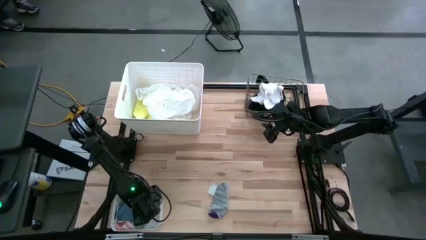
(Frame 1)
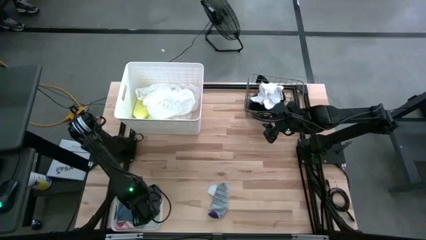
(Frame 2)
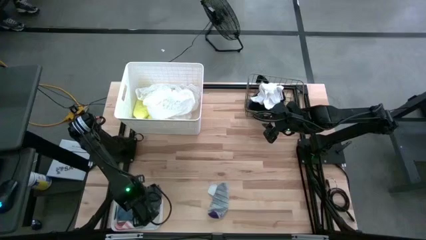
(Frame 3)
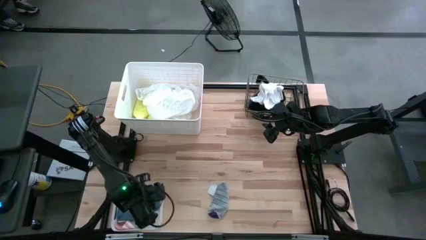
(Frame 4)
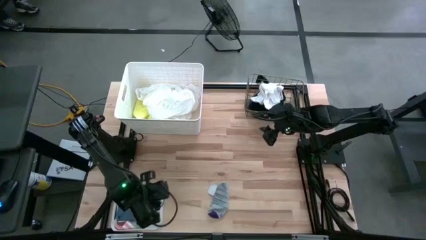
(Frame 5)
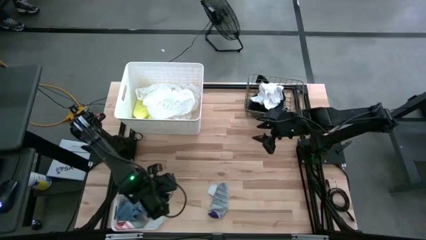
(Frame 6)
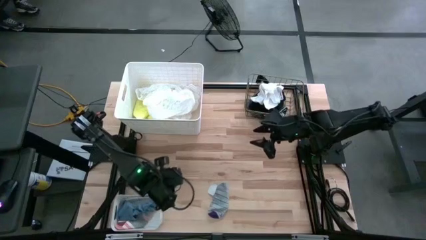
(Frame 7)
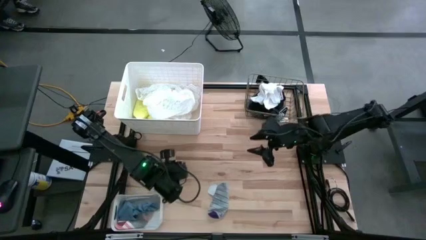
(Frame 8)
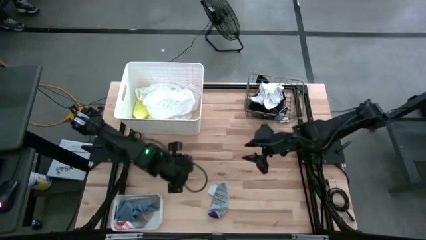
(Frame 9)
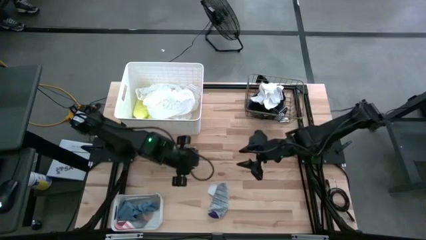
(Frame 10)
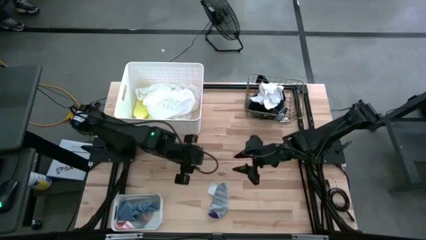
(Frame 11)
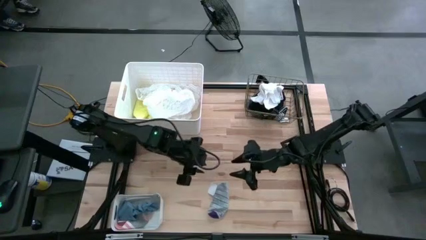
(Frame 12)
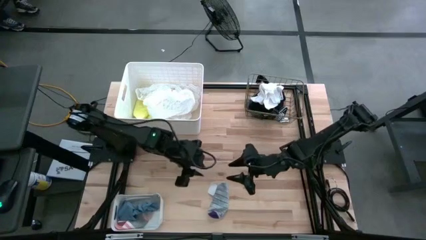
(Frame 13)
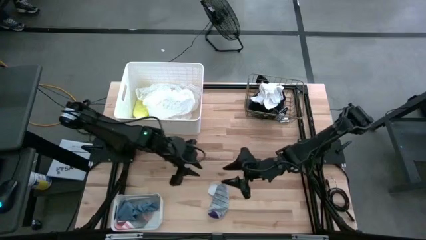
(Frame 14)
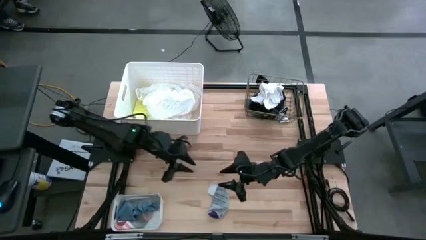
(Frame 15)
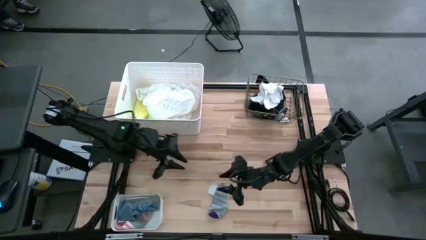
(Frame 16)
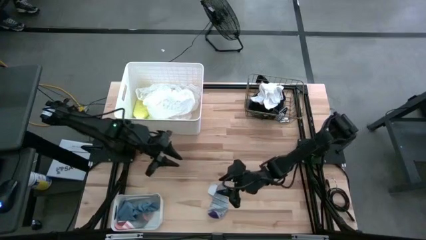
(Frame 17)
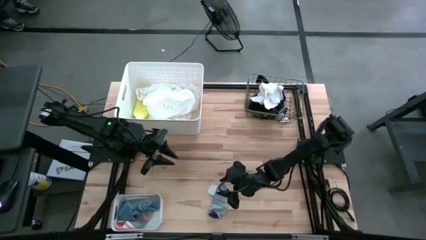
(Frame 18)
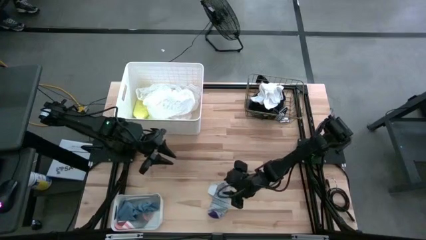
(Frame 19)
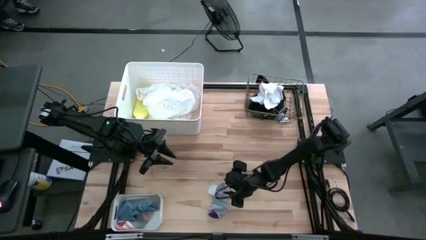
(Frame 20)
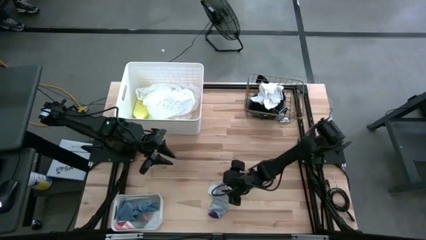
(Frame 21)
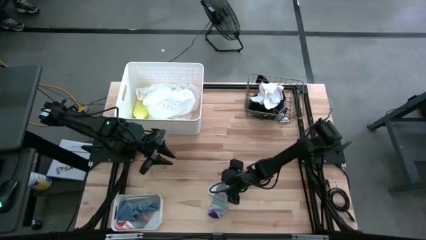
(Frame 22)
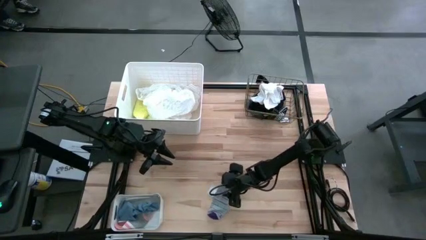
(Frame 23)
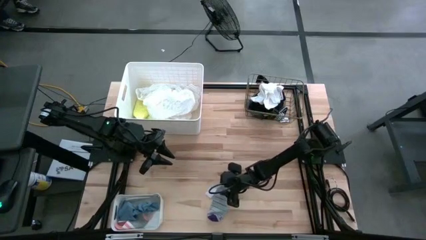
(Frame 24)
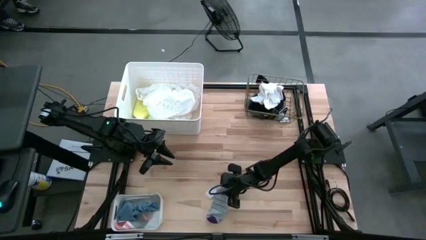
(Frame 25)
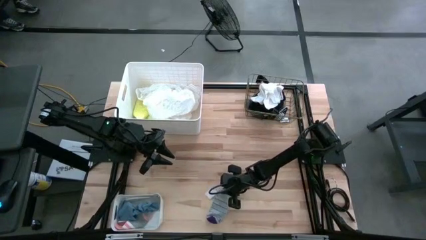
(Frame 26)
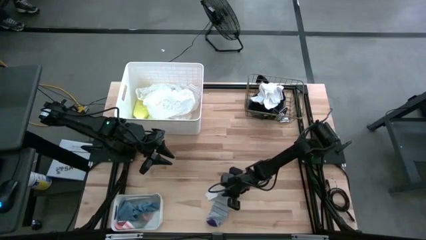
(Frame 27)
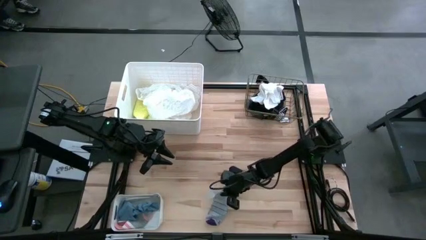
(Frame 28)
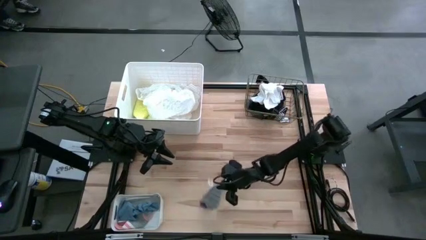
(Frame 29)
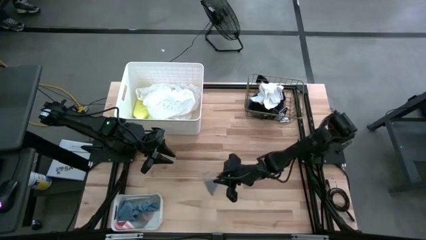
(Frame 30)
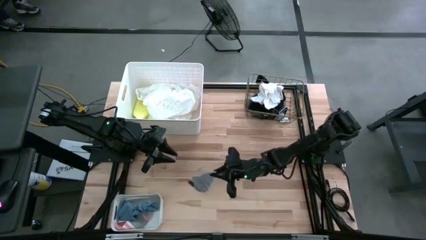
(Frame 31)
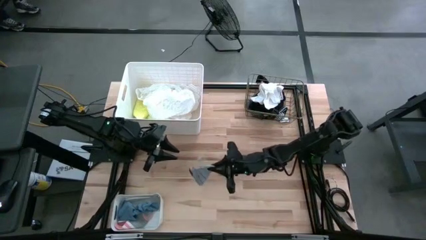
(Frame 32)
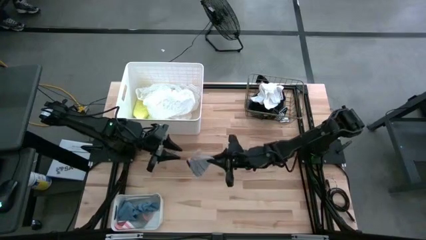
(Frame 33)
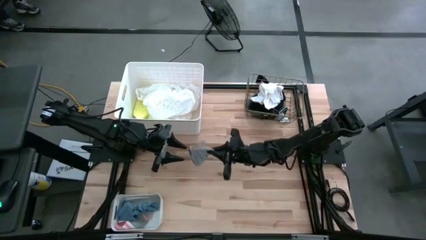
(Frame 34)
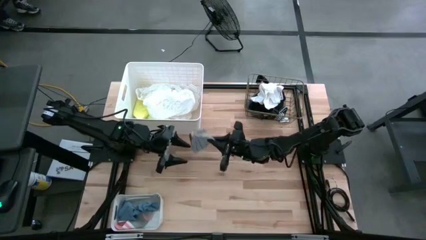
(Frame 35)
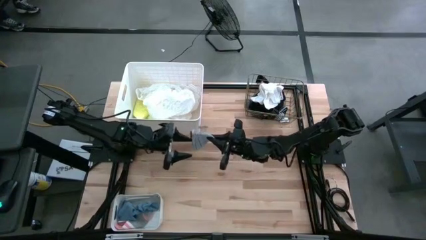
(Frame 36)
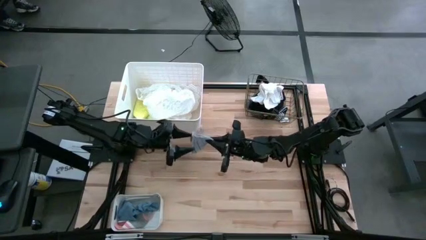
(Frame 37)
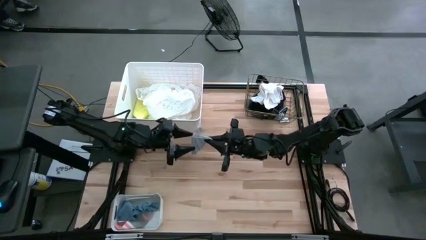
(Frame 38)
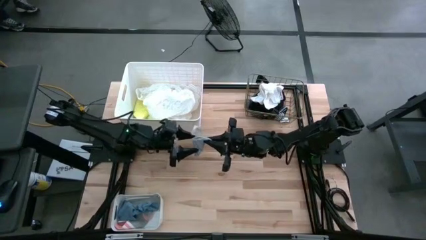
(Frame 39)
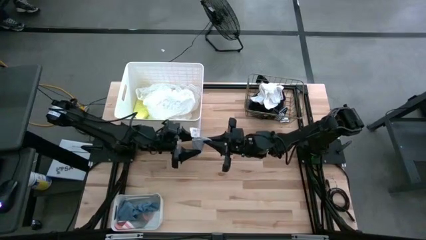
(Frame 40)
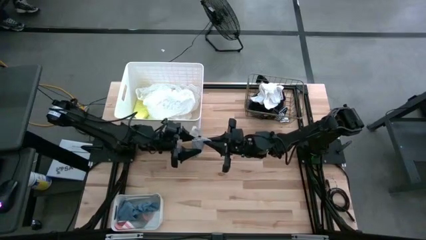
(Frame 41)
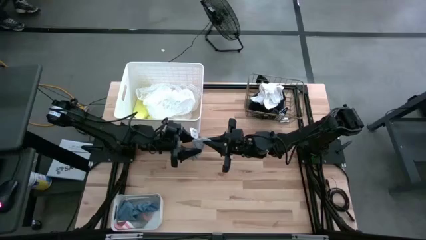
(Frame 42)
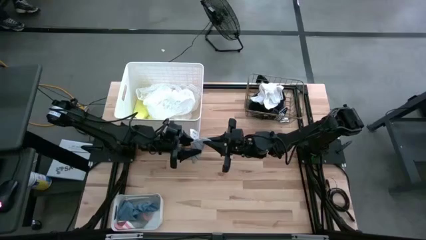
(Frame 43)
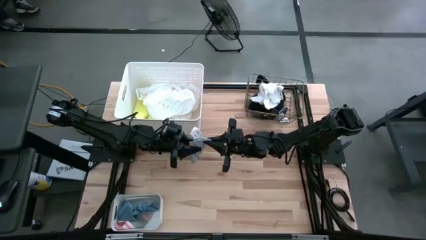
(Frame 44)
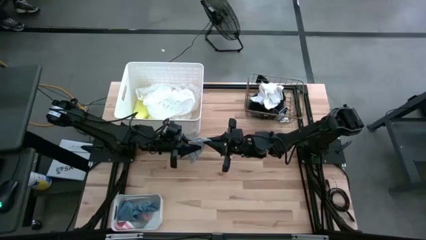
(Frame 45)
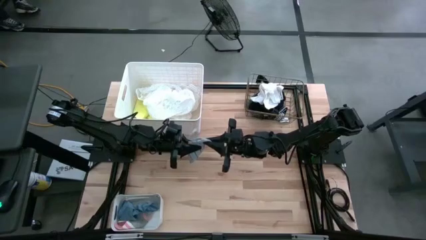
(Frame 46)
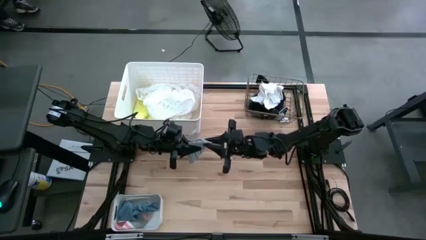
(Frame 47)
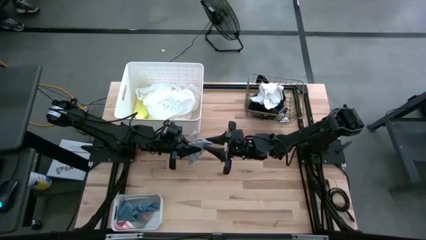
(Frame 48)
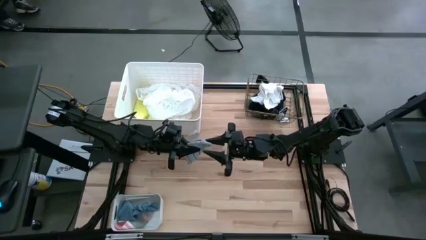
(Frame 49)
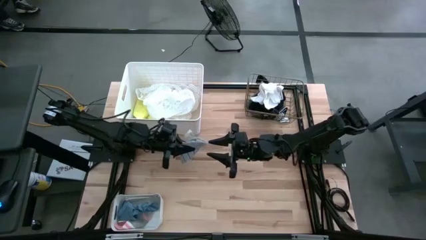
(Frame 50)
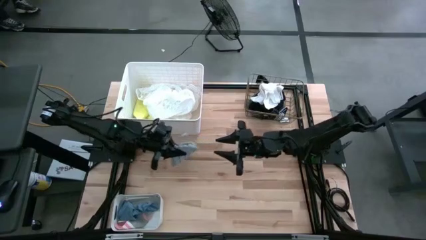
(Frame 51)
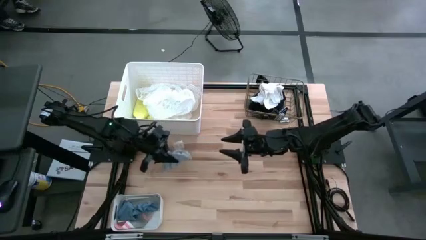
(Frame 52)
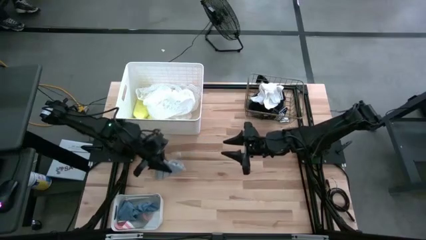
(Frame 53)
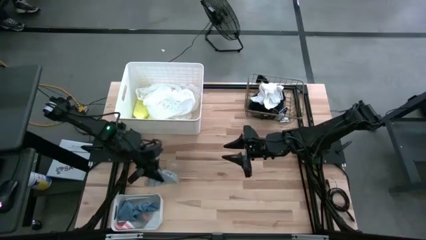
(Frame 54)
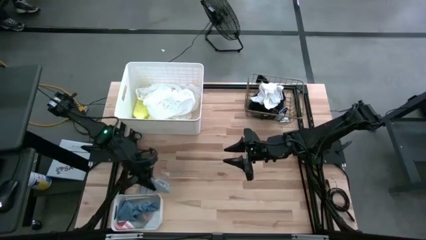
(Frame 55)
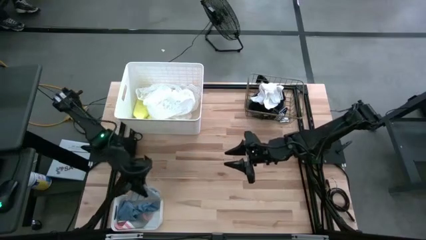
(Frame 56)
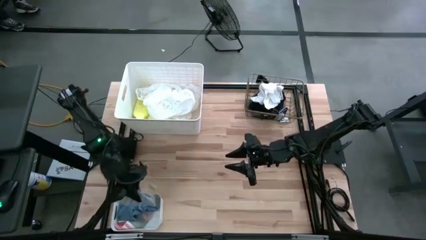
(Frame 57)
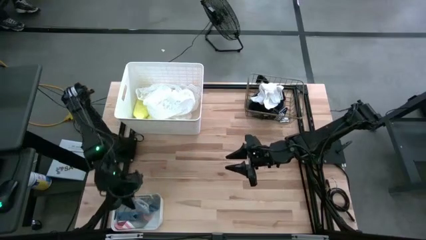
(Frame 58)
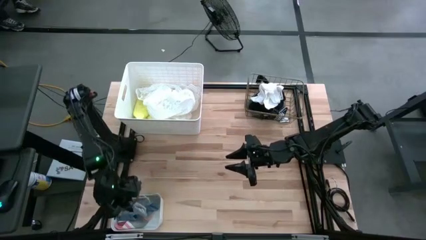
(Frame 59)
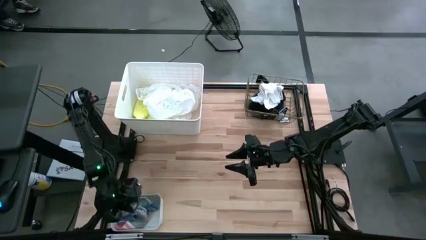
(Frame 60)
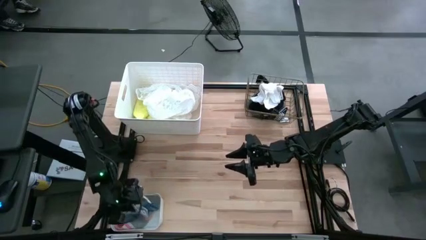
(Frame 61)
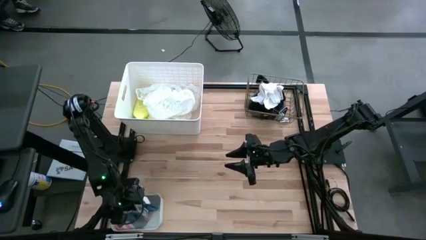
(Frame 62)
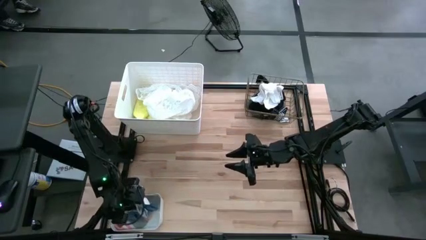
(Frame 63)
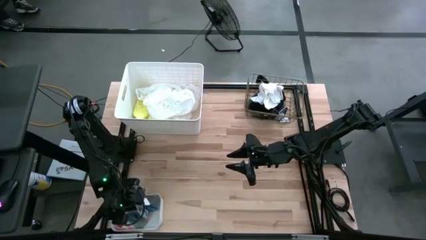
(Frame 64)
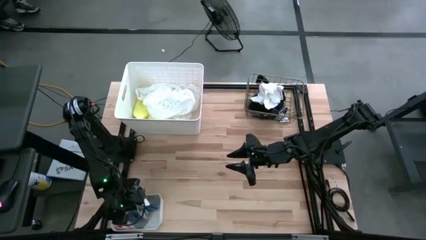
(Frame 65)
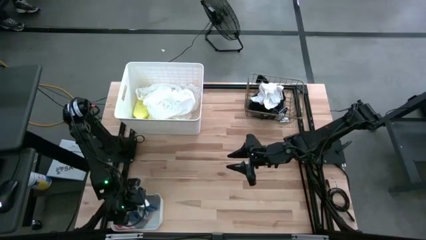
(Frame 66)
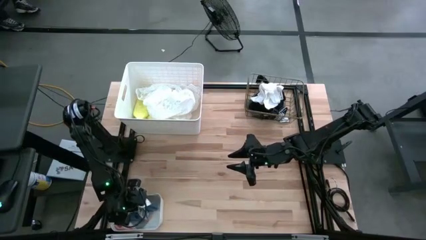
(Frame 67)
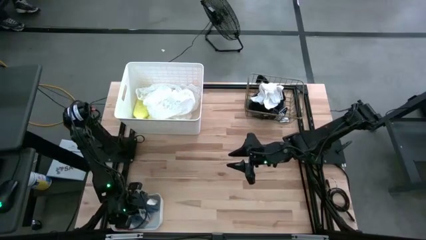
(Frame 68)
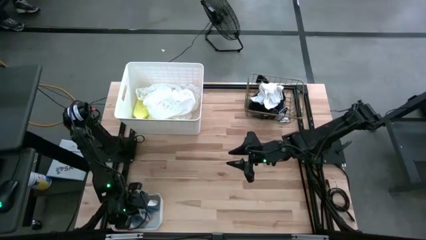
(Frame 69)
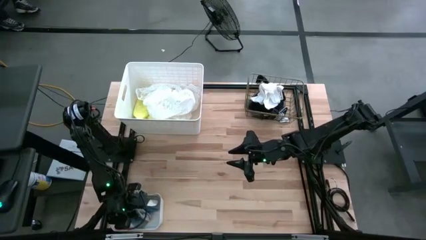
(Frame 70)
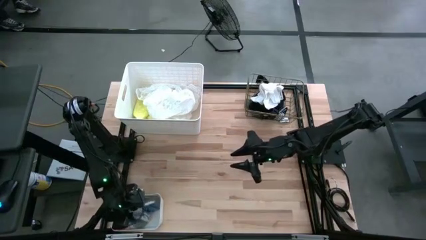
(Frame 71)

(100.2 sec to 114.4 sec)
Task: Pick & Place Cloths
Put the gray patterned sock into the bottom white bin

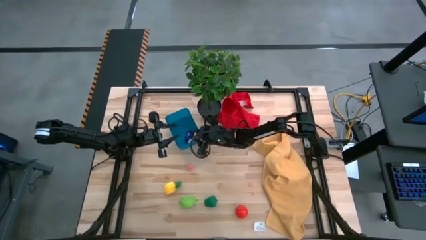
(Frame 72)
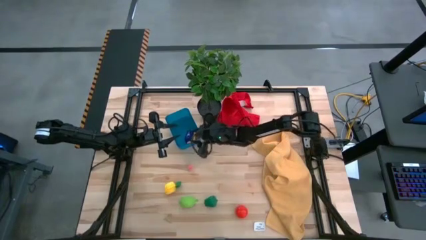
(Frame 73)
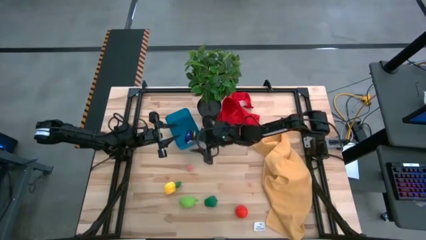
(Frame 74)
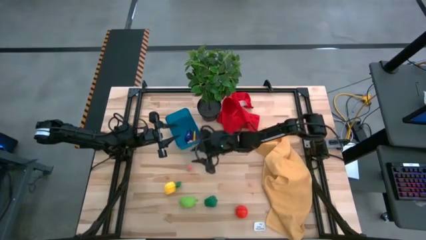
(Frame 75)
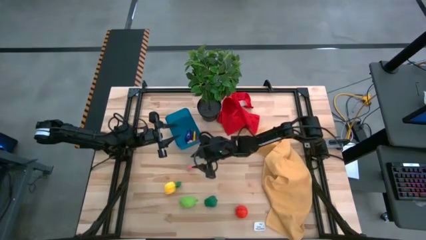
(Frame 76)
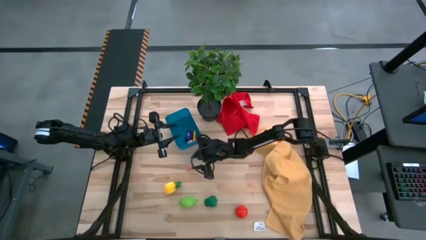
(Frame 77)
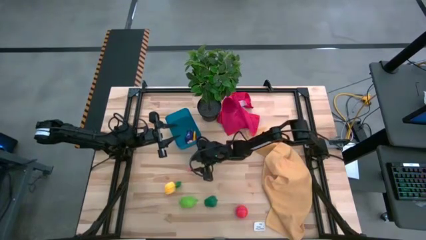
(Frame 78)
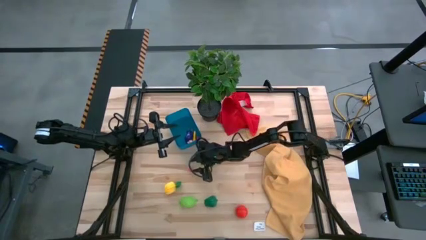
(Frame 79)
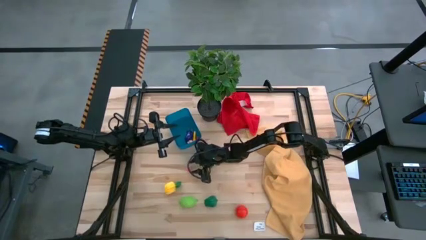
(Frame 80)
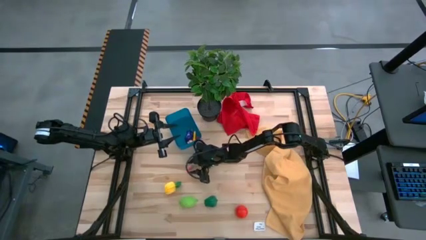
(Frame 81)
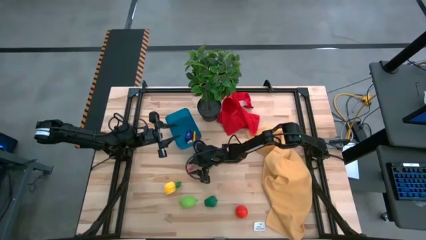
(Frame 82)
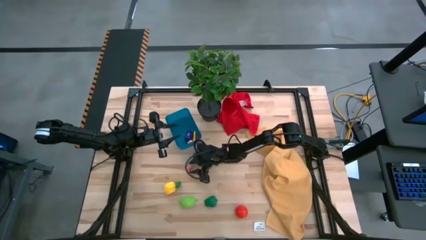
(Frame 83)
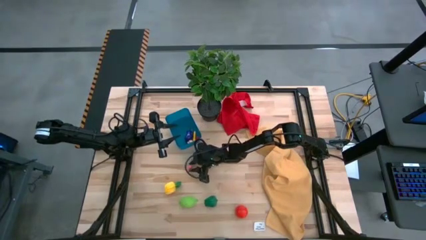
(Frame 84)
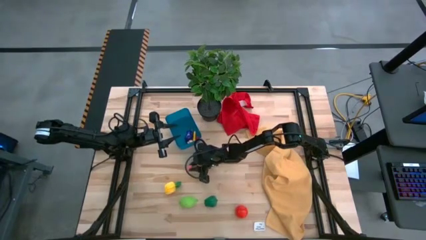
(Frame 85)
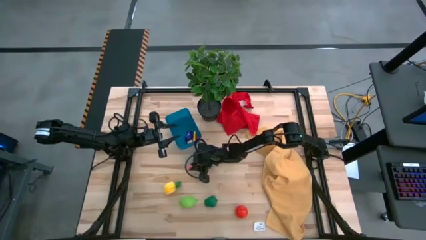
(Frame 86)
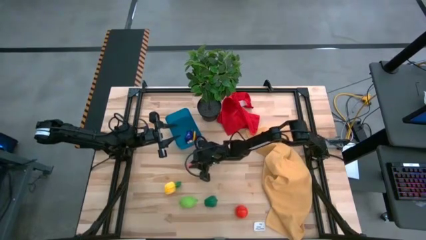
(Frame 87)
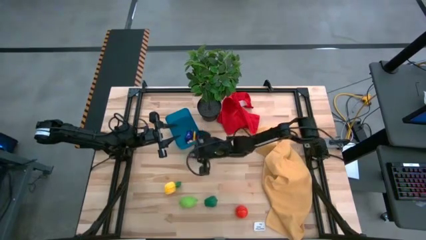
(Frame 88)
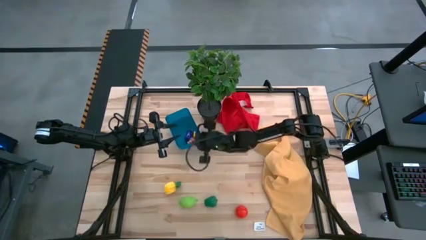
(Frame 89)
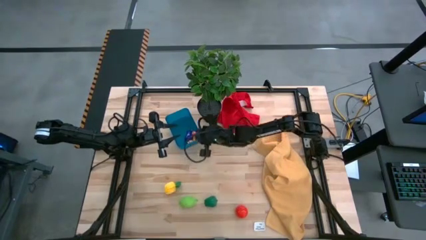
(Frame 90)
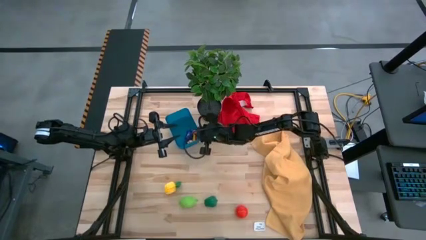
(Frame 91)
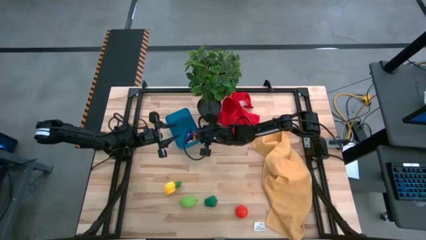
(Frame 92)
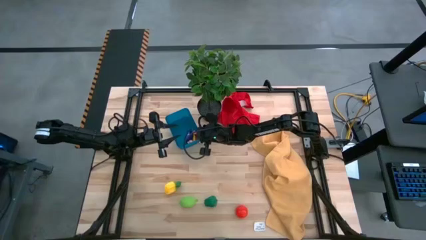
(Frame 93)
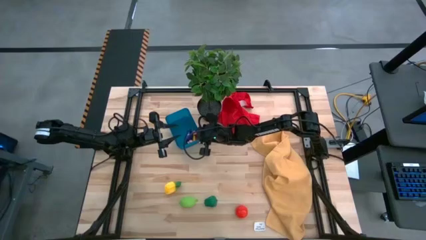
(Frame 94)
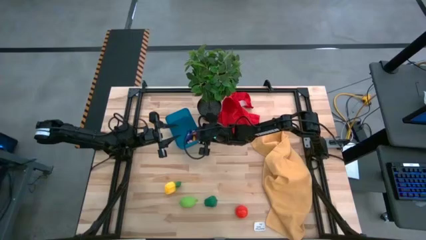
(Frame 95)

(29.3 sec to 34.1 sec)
Task: Pick and placing Produce into tupperware
Put the pink peach into the blue bin
